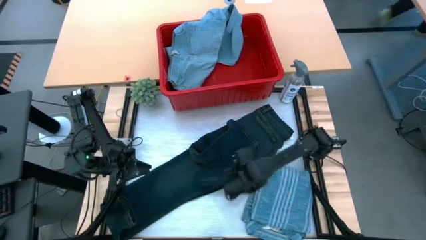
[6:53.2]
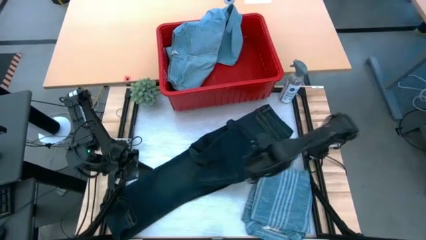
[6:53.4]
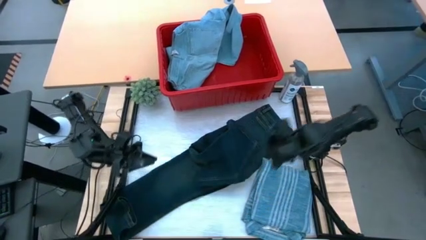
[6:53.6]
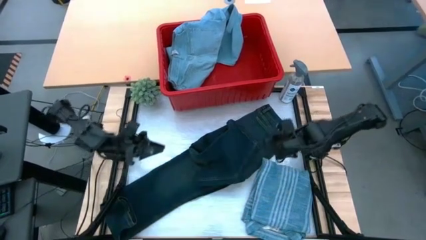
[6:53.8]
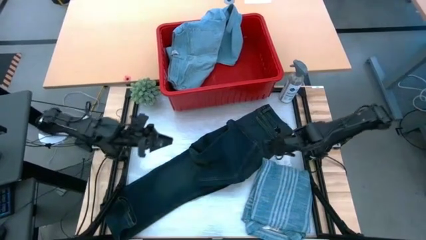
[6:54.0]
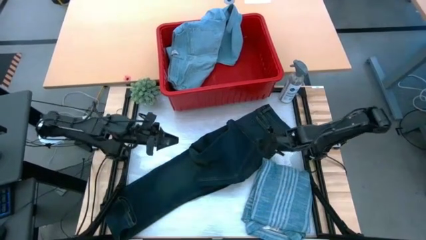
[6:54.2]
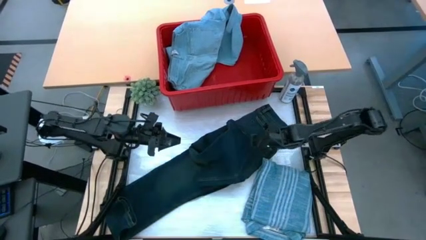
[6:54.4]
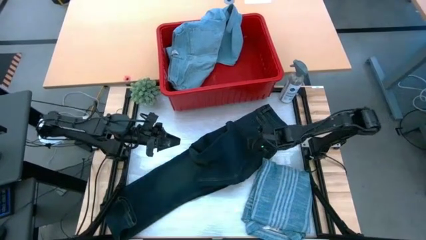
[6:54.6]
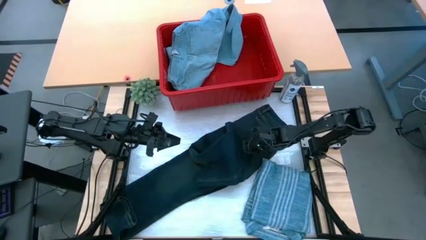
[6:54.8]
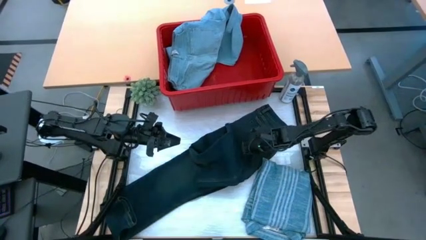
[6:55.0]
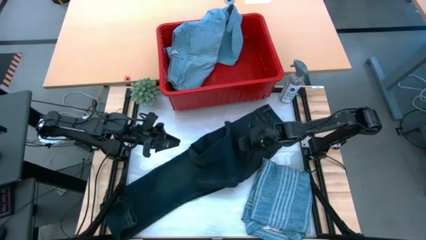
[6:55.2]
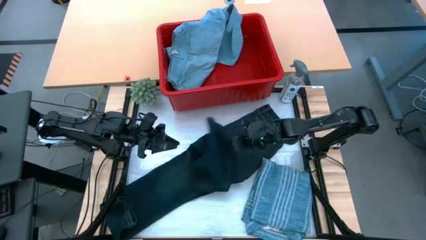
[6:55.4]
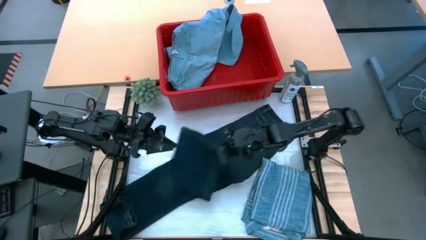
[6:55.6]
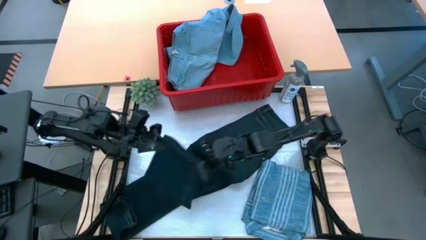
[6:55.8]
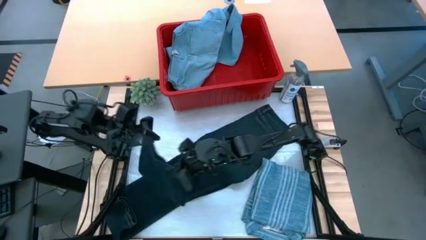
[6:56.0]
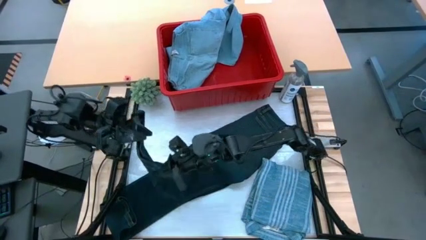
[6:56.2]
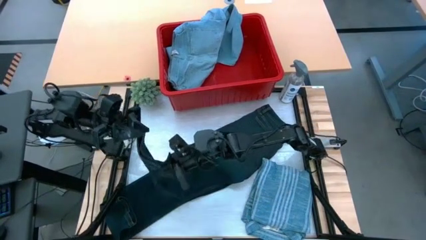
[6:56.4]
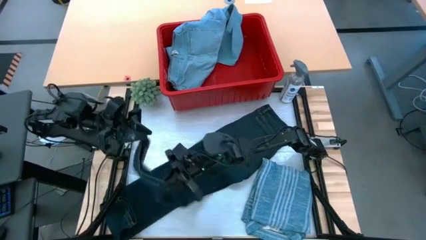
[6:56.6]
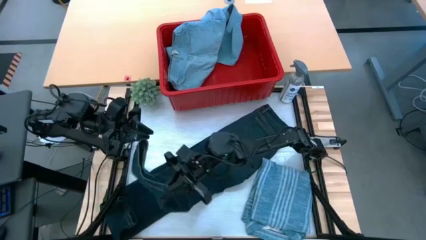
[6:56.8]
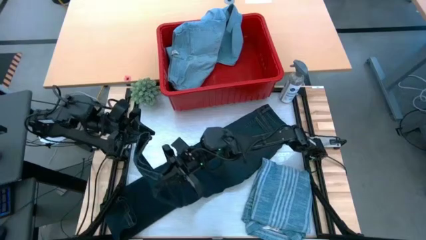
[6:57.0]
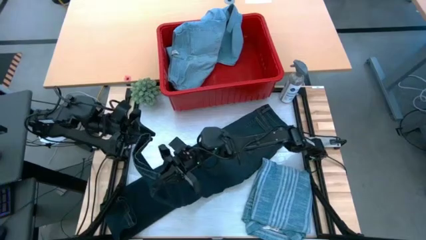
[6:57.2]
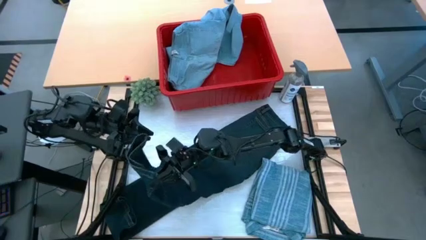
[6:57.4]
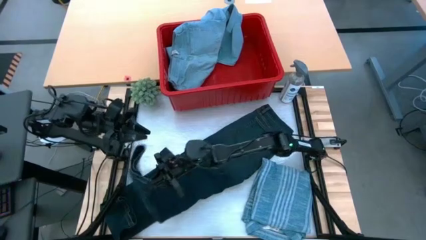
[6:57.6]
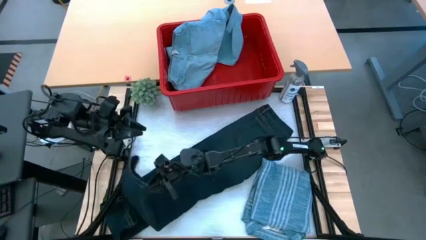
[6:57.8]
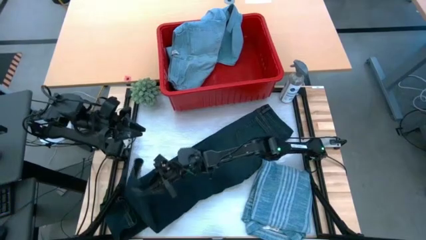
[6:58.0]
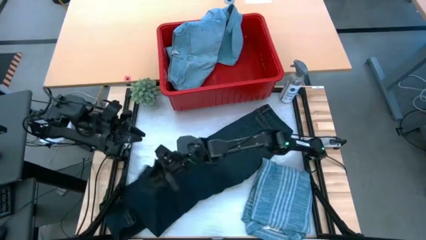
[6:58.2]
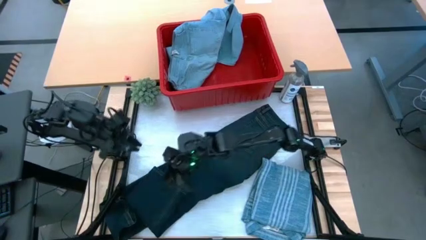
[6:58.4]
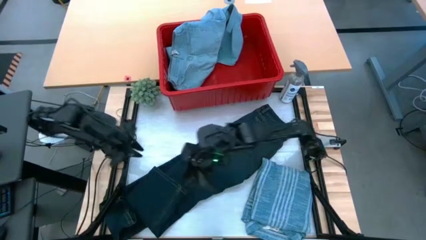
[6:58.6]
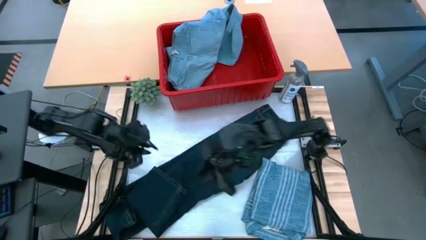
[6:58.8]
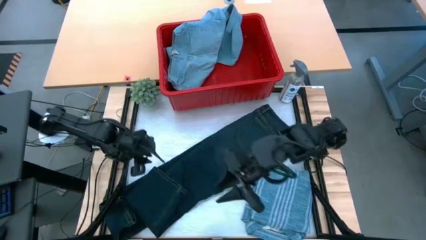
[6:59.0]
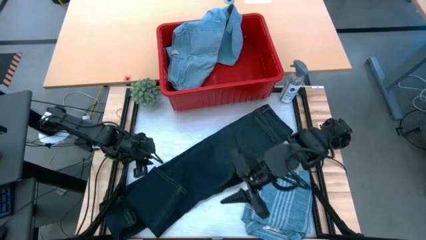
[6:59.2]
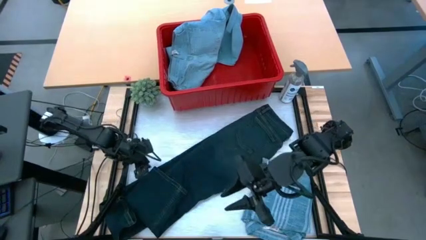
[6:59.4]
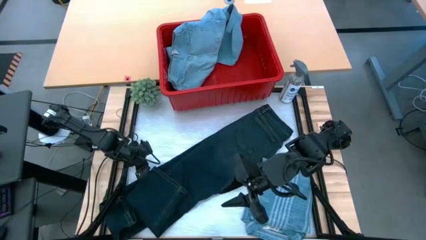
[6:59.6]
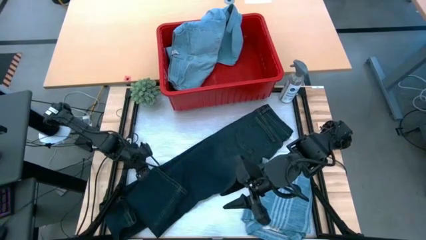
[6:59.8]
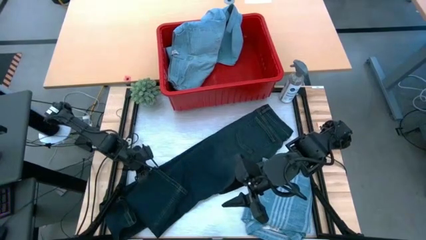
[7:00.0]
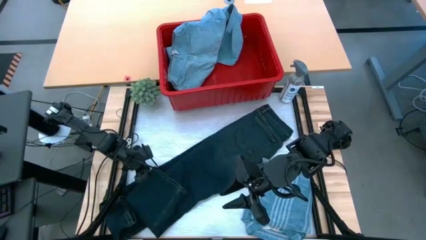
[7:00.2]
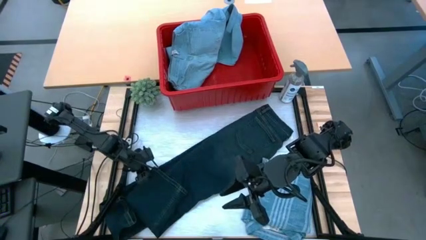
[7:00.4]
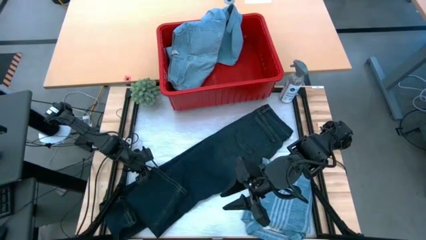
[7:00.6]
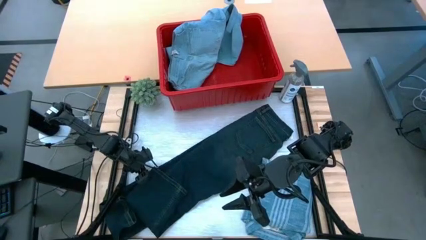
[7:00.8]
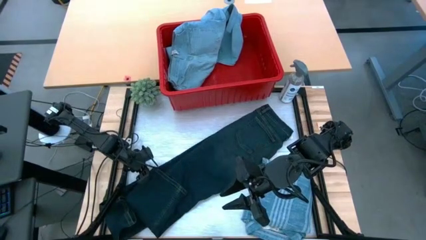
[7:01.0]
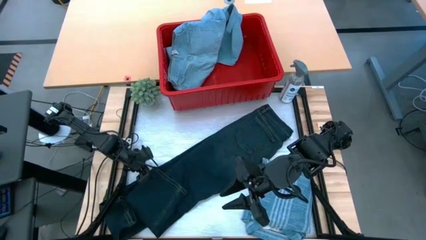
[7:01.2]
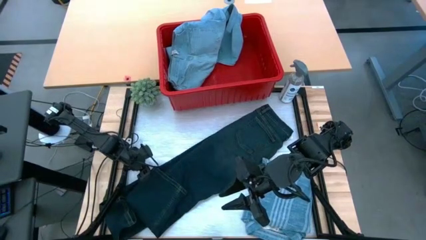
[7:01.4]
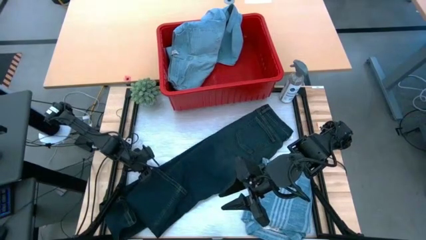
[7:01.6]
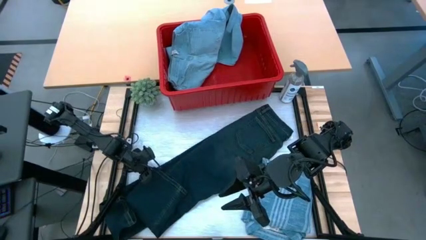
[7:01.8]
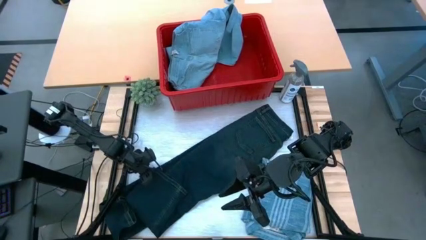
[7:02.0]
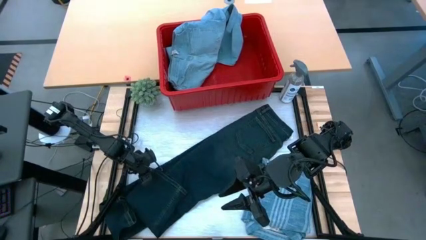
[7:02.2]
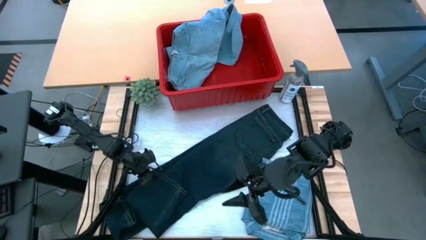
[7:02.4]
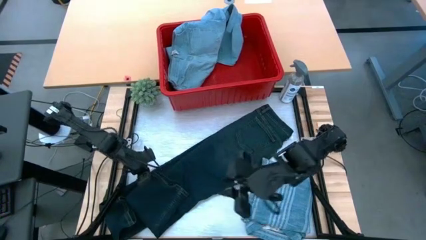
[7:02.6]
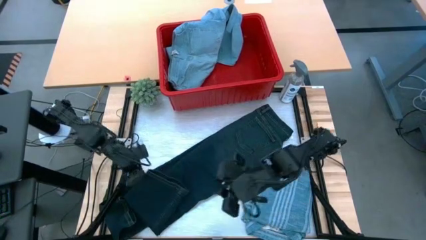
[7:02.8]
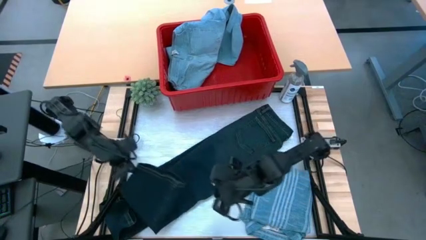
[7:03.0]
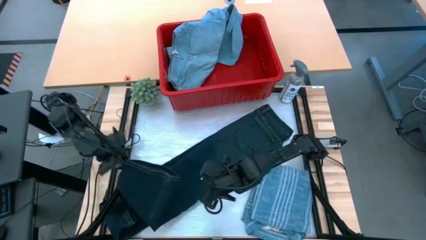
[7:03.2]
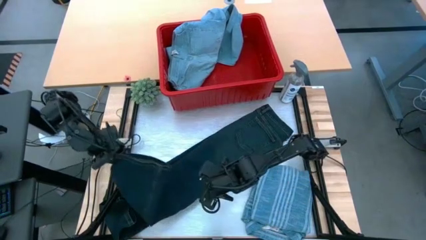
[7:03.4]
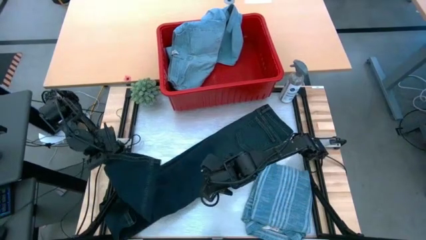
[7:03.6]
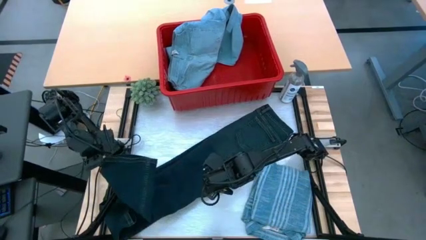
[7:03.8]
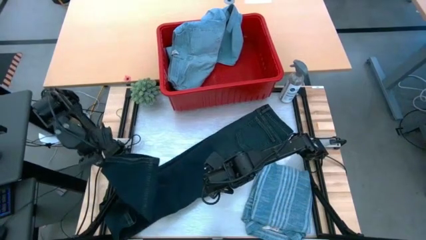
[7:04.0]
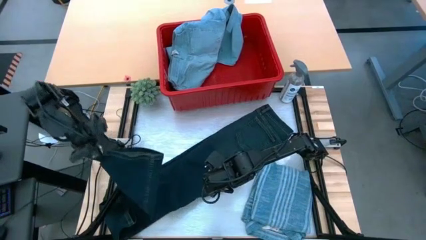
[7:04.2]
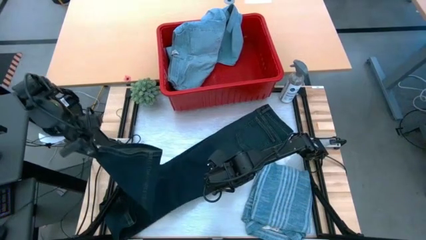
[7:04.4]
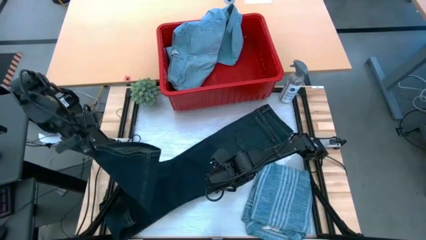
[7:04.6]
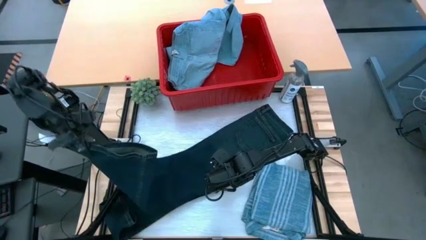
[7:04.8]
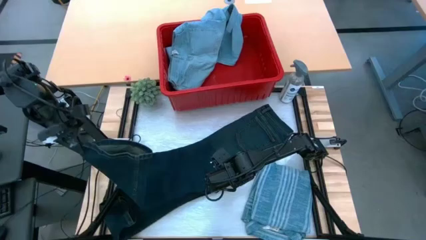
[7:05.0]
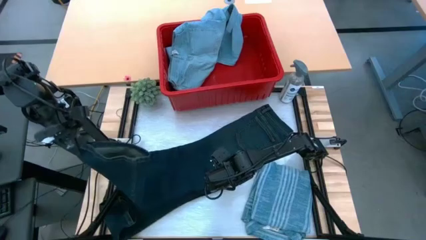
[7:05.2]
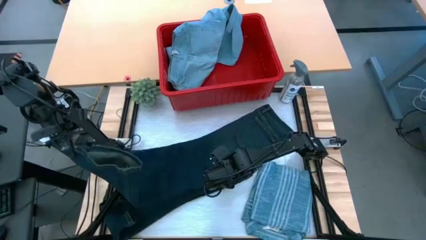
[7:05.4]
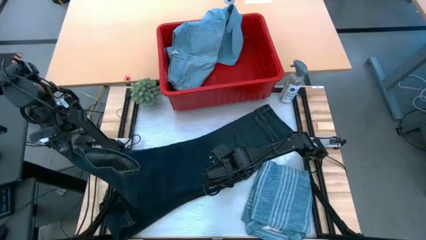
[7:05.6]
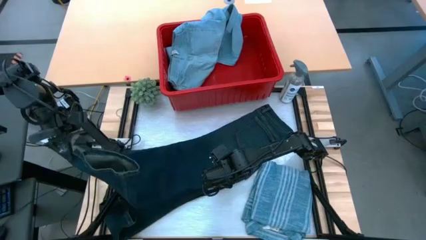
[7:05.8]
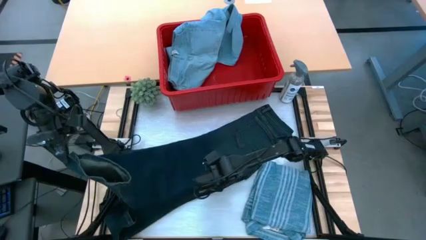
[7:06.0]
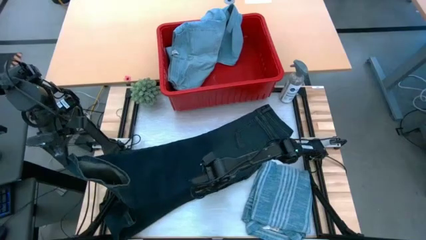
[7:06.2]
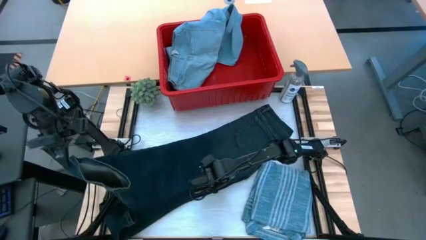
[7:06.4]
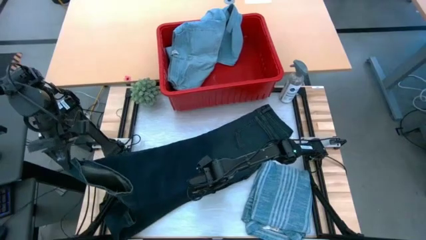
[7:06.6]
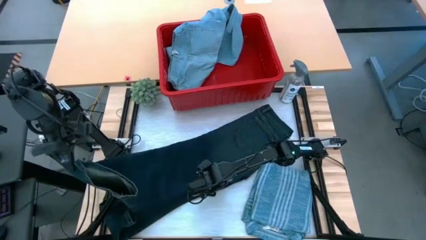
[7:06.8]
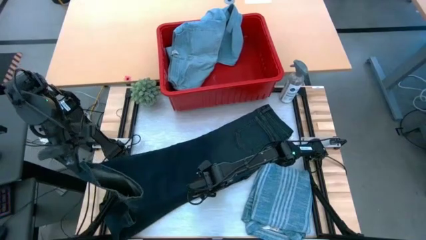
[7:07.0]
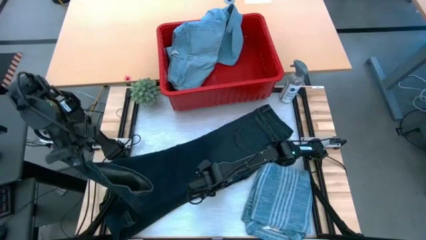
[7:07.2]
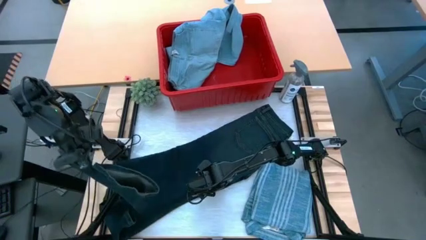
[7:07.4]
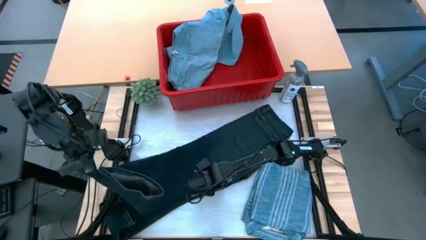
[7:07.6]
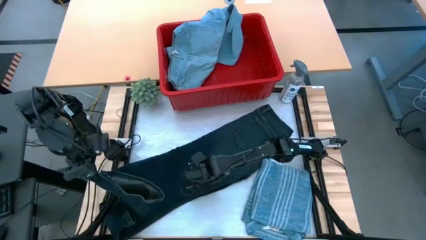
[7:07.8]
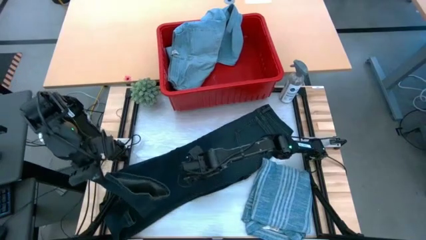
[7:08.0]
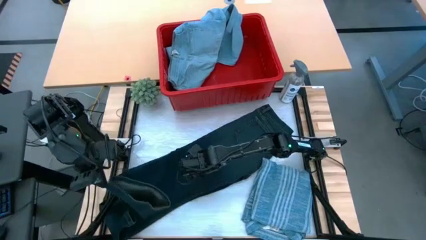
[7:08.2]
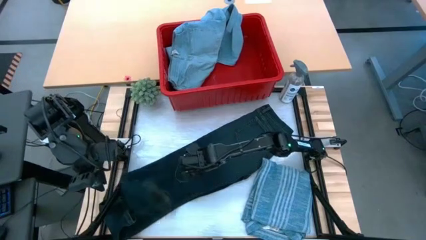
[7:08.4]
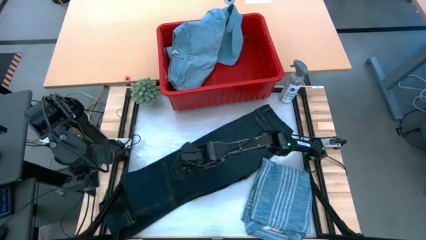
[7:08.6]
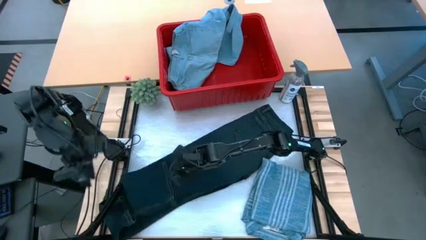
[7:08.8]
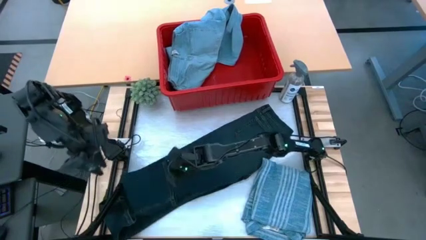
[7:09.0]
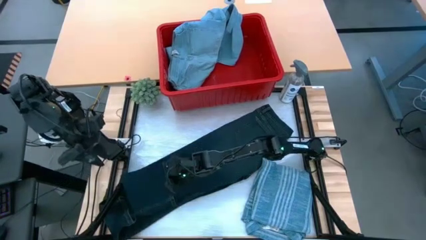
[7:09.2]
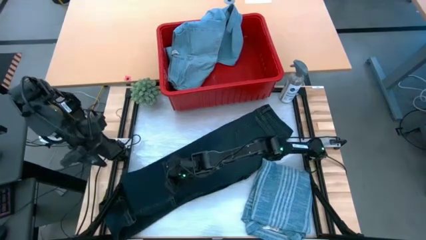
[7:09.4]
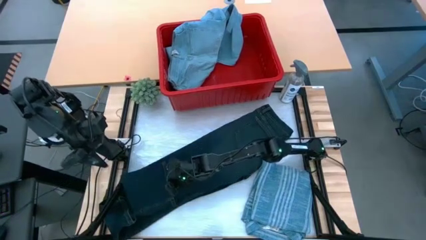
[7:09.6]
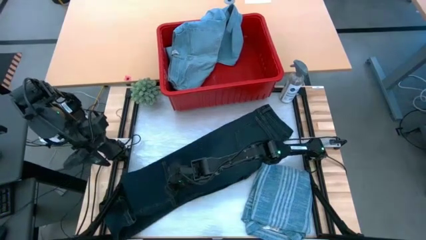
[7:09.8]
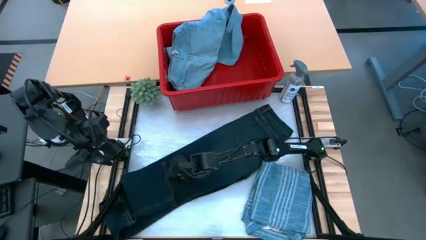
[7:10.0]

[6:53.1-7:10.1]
Task: Fold Laundry from Bin
Fold the blue denim pants
